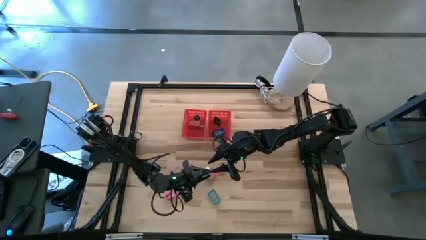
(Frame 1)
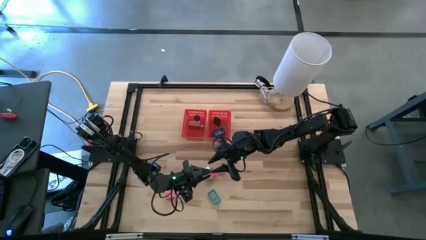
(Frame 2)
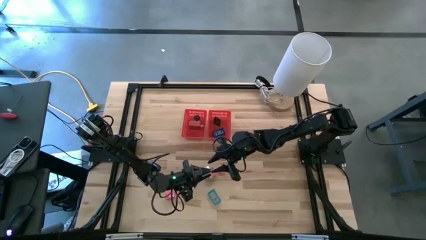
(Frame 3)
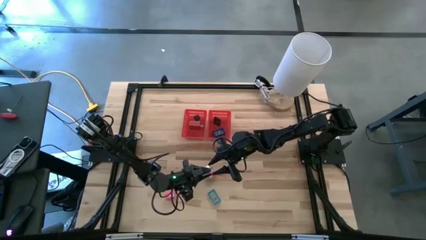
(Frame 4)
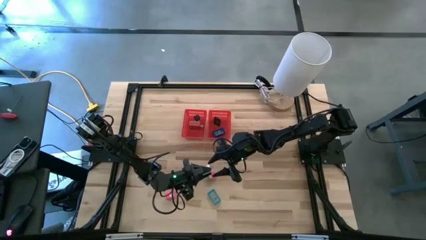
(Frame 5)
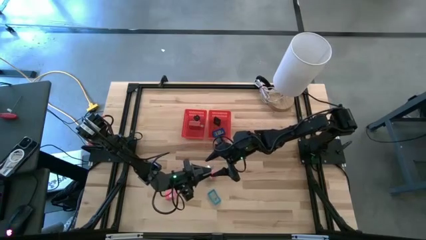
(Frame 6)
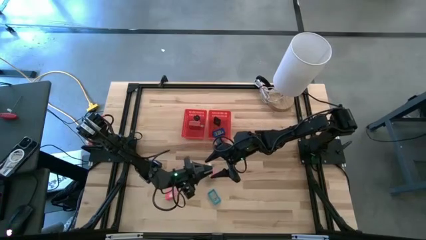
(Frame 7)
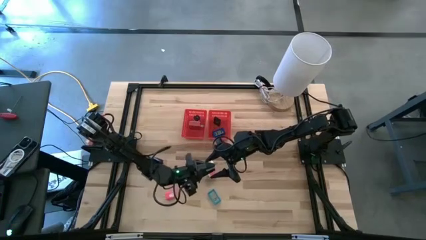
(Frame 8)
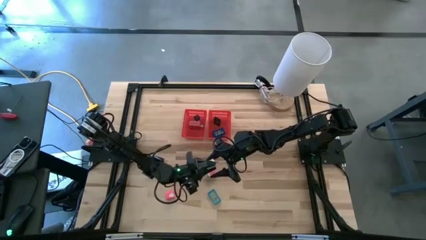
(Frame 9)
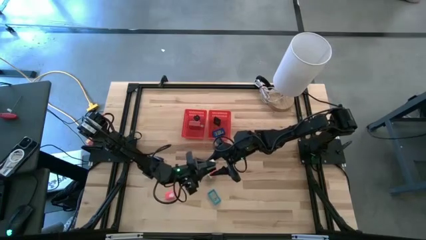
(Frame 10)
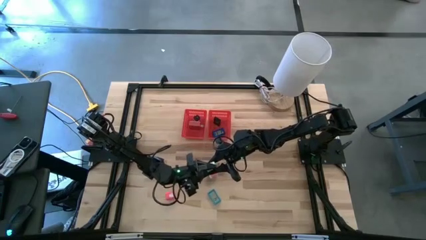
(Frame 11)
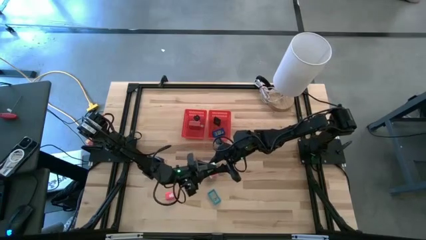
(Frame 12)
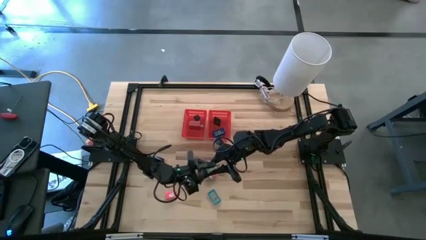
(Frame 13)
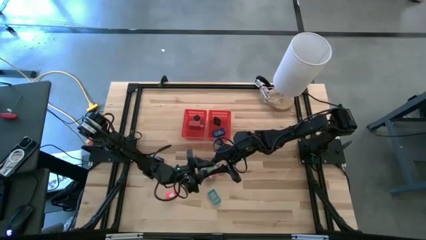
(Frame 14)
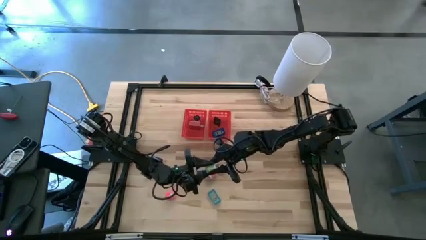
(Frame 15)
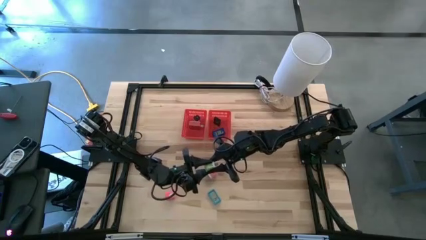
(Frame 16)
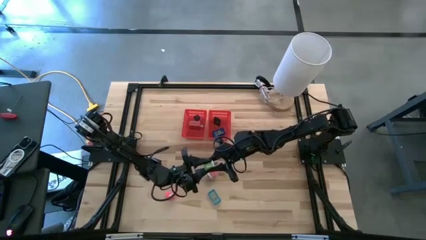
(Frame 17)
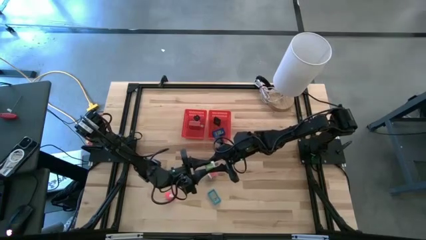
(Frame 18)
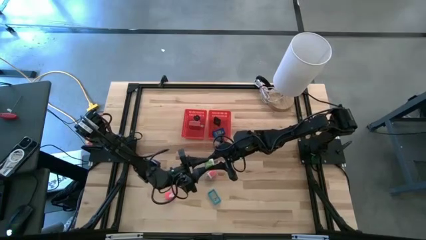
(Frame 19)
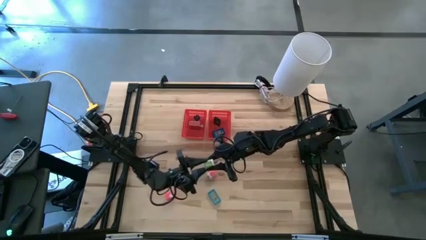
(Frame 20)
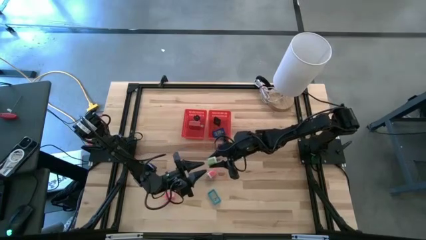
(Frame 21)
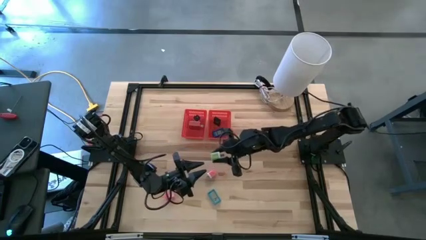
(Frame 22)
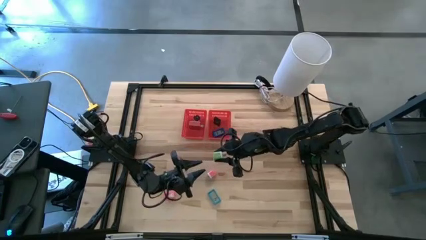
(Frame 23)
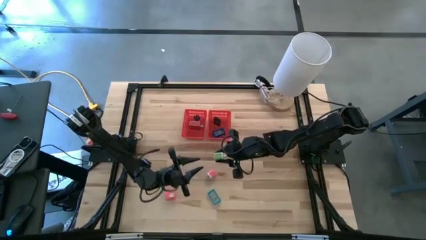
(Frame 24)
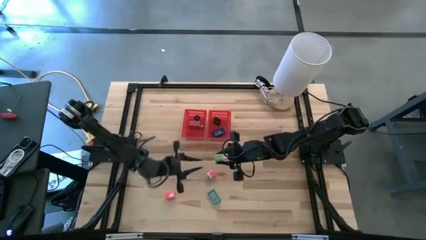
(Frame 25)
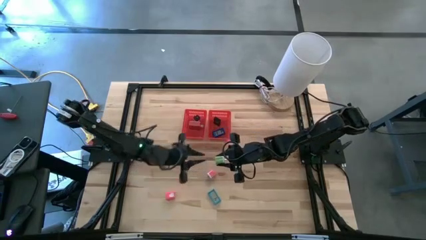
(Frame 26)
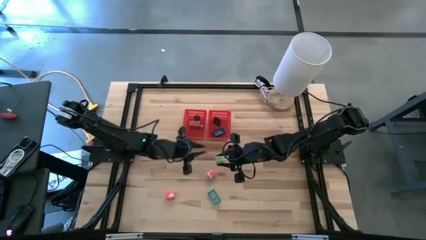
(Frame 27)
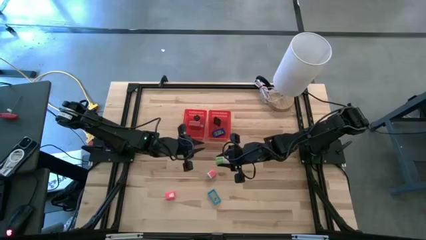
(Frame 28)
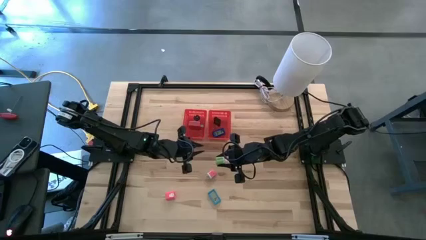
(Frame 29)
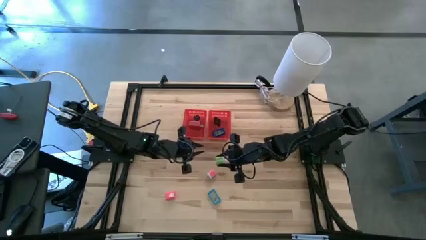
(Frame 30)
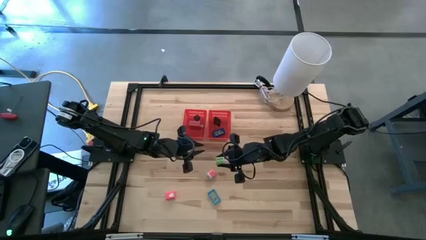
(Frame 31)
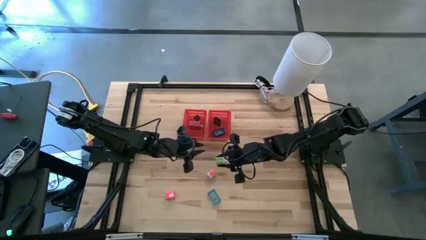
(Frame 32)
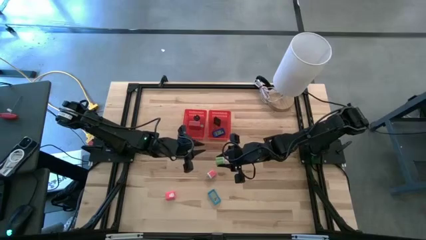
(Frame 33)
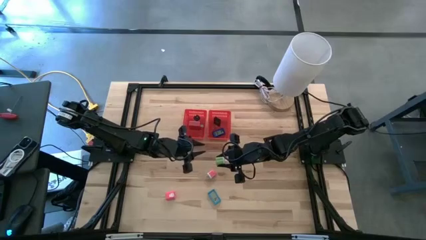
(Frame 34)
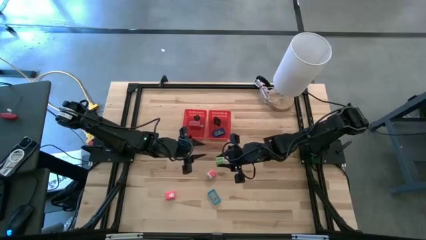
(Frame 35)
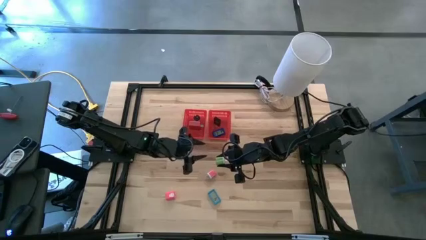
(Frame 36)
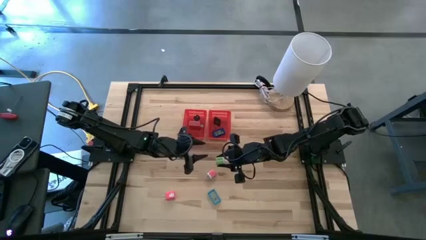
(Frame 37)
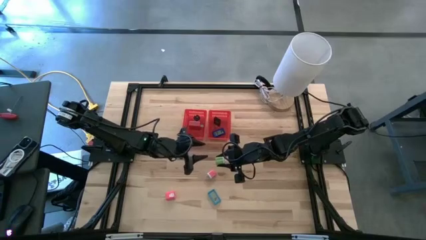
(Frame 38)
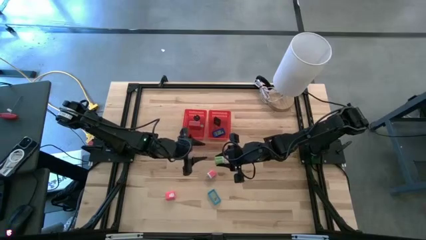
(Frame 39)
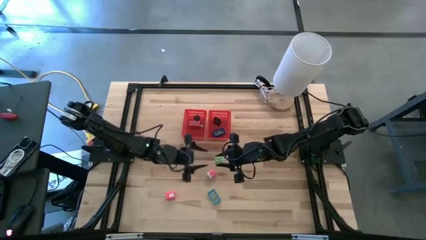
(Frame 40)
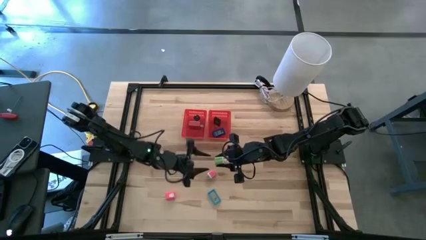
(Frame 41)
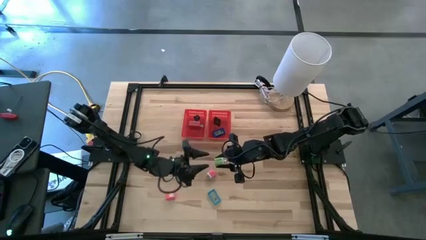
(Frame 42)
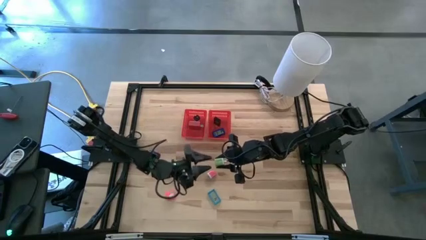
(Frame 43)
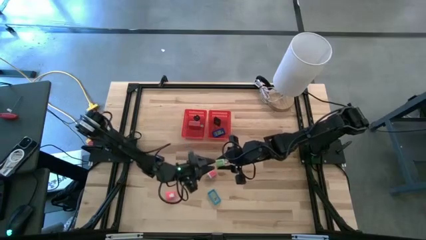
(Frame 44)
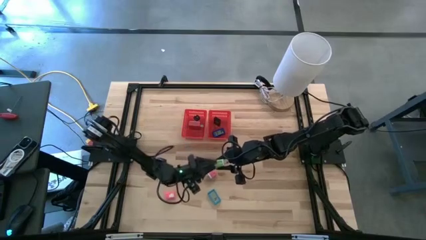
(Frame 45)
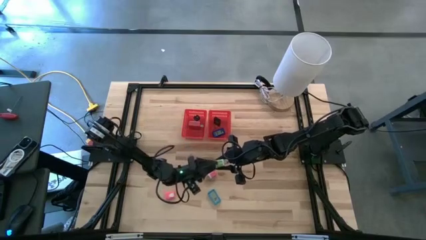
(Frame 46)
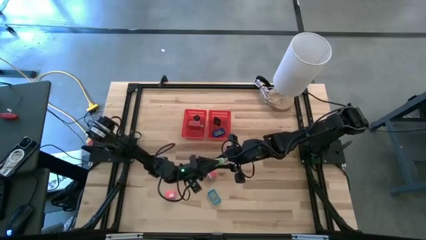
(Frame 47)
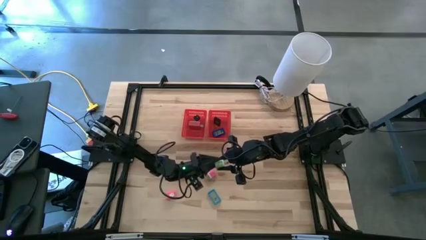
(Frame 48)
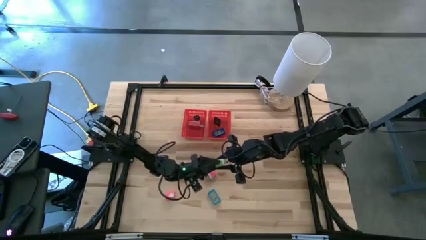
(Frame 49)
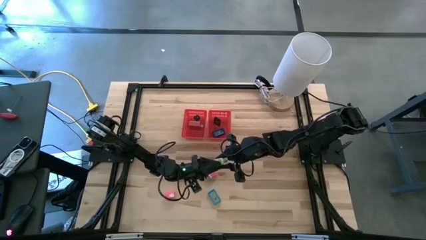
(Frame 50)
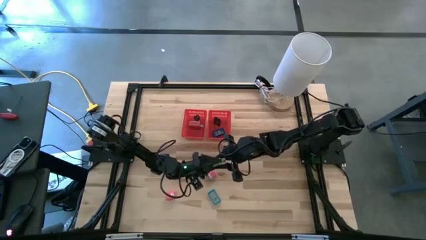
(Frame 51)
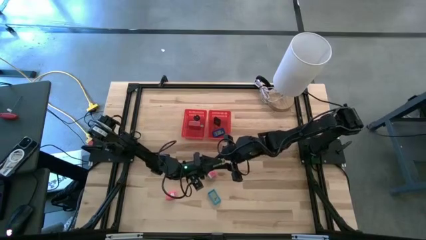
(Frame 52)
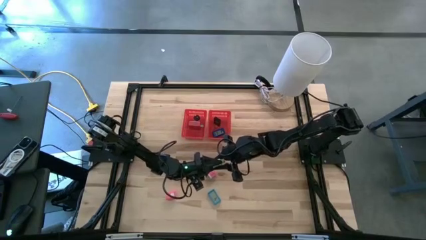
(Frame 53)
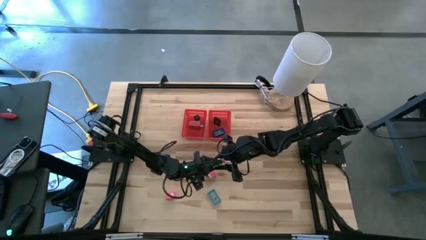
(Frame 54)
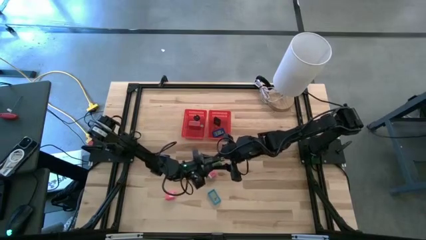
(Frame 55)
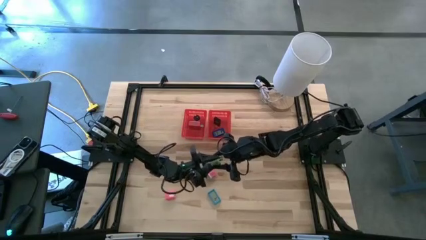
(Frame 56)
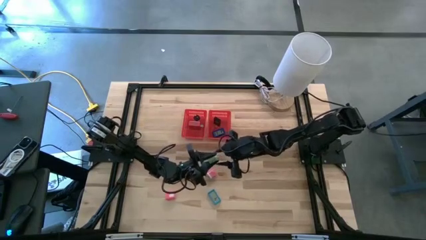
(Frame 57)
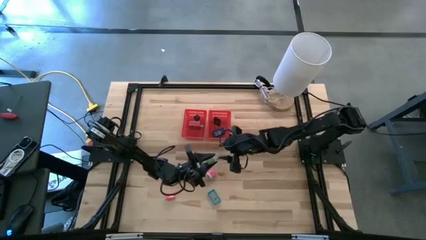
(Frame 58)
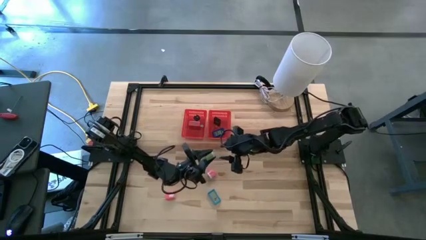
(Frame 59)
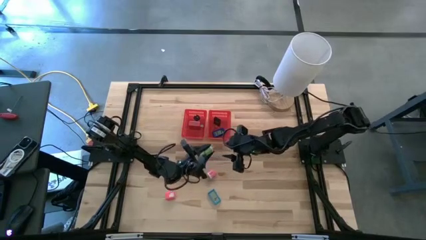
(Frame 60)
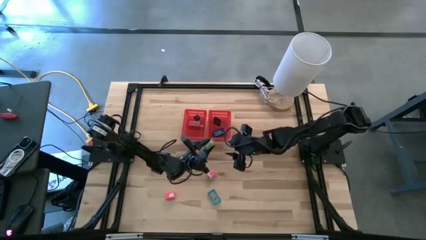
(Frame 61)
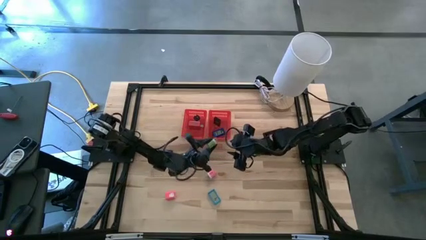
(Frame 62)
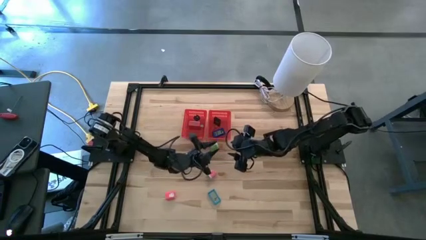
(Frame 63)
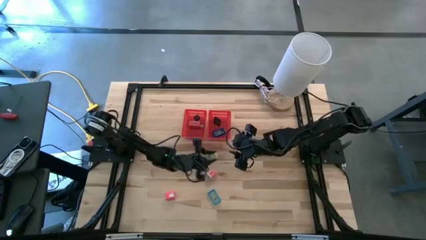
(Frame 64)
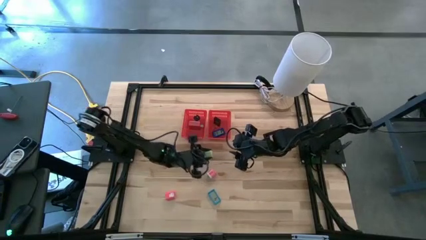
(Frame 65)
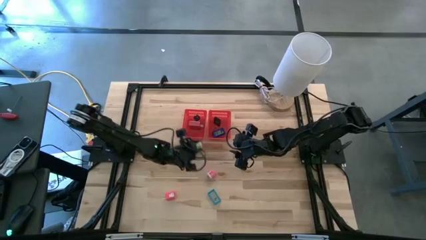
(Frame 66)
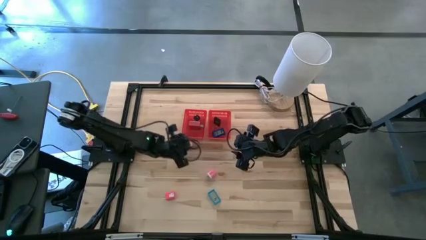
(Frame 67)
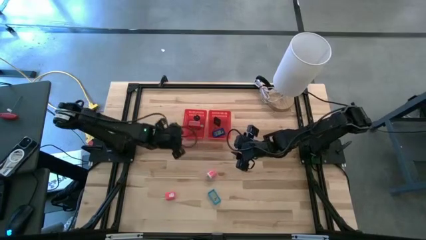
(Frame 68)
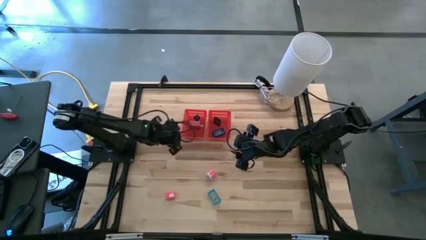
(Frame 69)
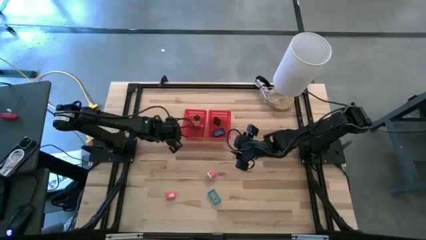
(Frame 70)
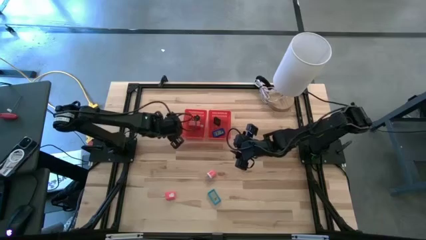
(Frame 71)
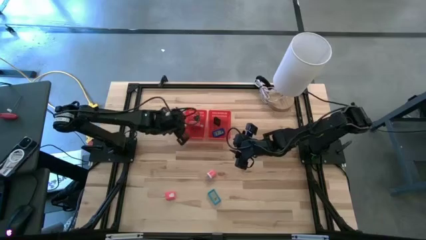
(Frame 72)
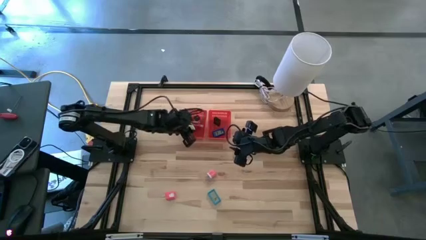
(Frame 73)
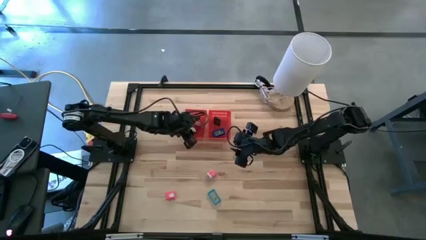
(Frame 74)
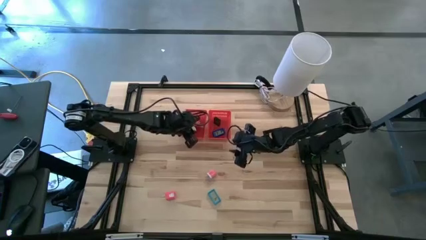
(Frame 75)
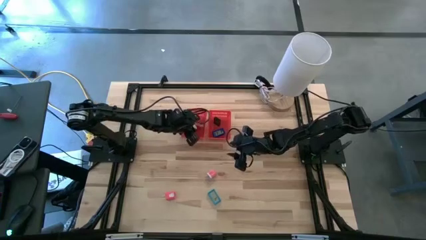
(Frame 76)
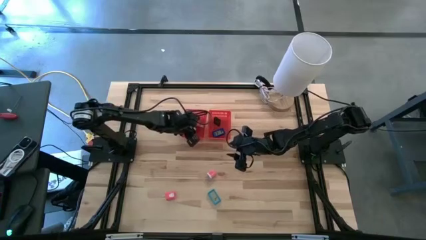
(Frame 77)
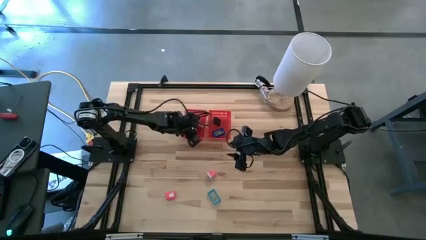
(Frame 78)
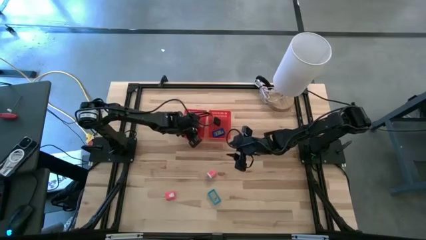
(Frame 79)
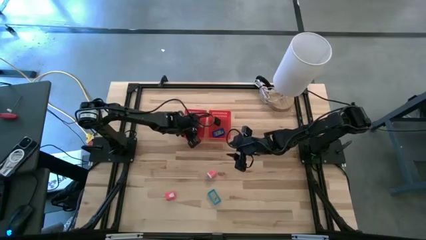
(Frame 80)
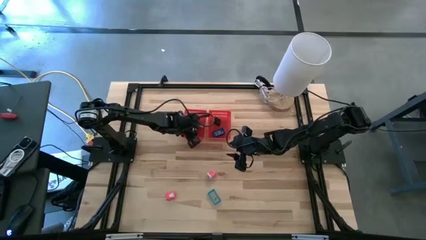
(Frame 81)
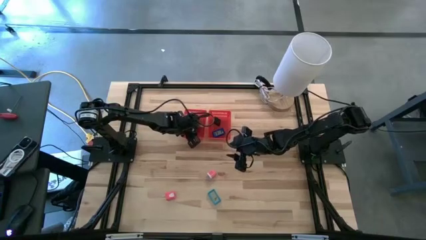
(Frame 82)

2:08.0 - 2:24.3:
Task: Pick & Place Office items
Put the green charger adapter into the left red bin

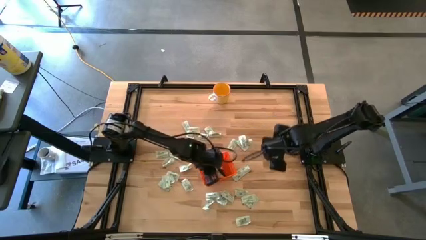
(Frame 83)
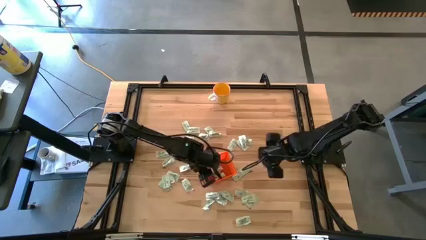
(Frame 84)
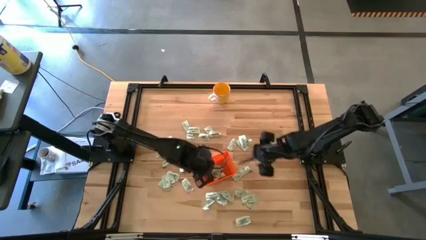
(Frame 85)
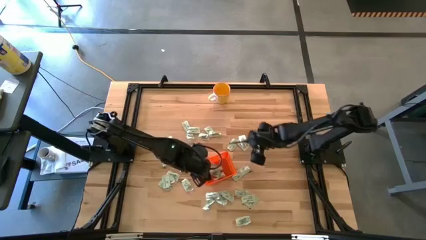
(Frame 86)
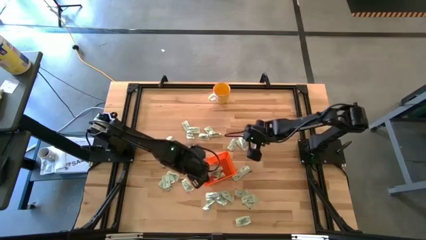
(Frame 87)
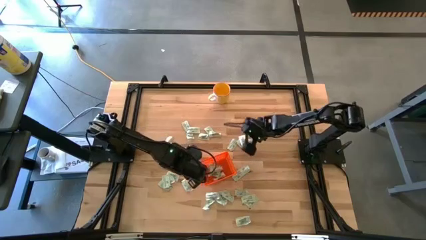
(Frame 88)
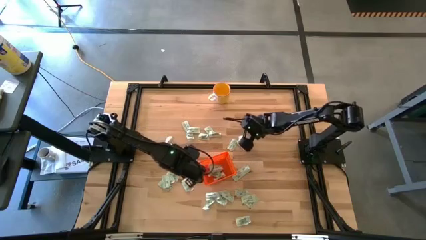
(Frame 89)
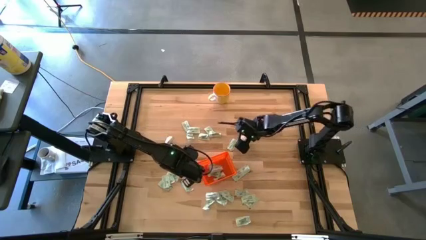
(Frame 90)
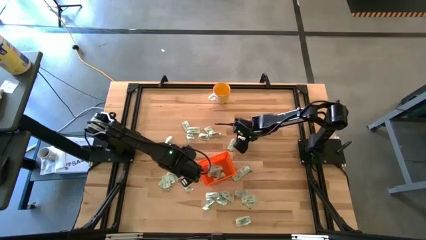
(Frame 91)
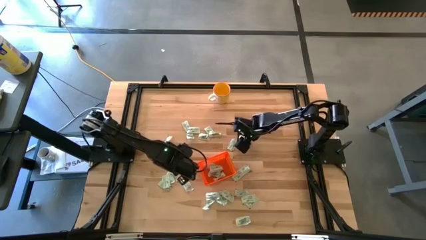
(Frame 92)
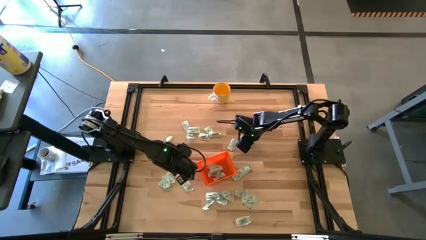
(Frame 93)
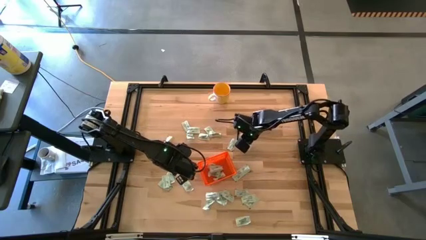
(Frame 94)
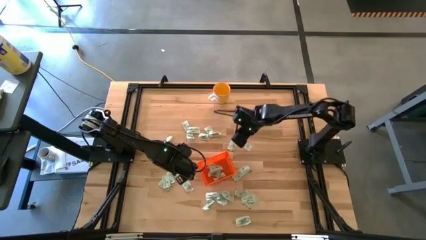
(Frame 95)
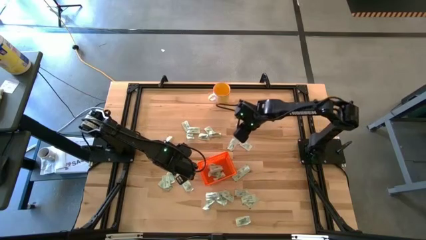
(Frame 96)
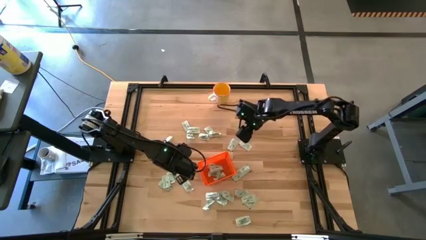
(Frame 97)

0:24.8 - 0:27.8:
Task: Pick and place Stevia / Truvia into bins
Put the stevia packet into the bin
